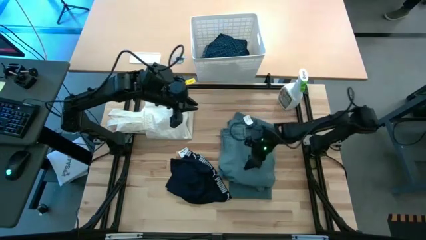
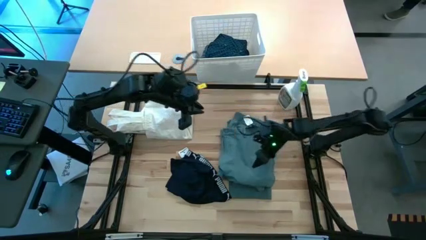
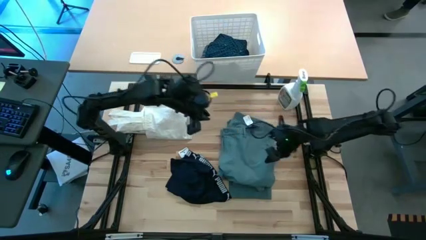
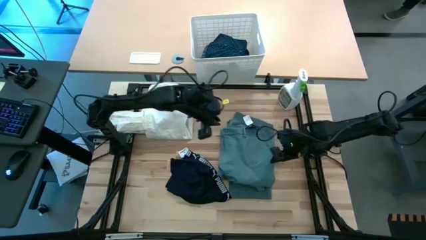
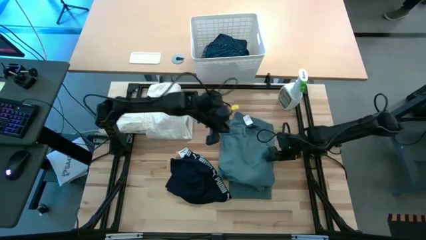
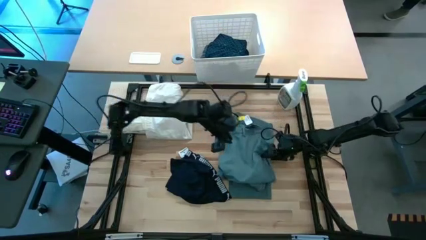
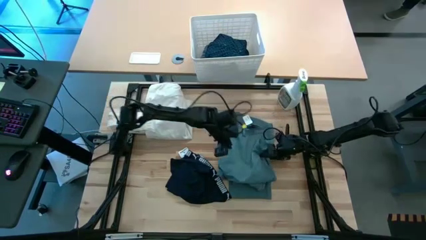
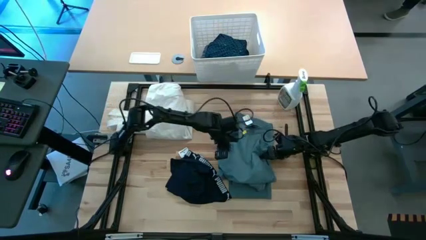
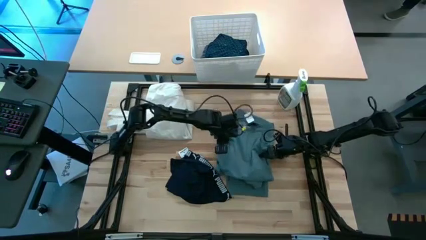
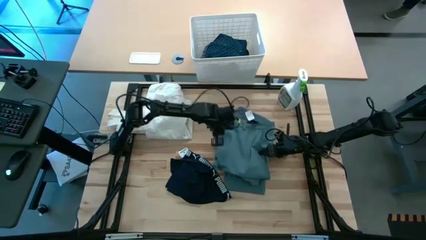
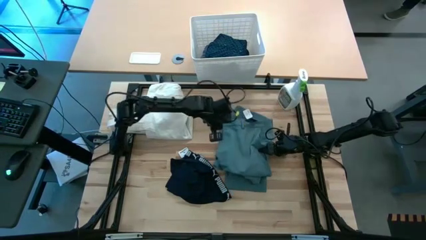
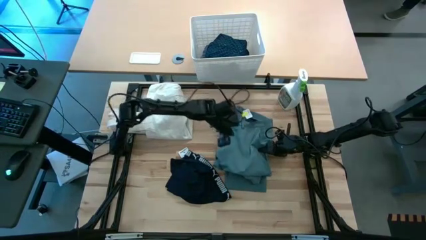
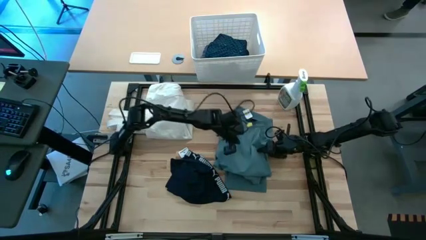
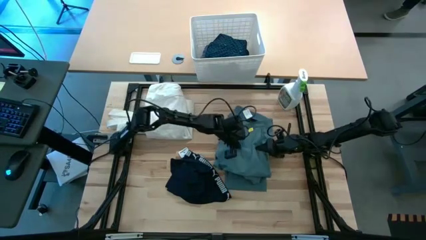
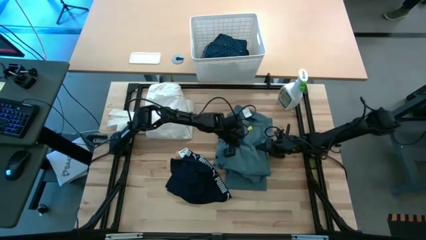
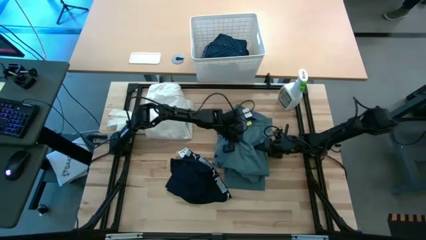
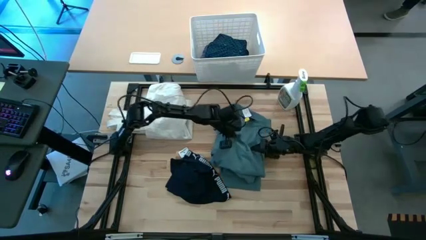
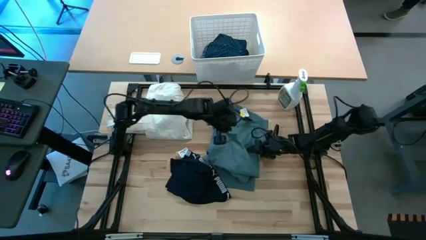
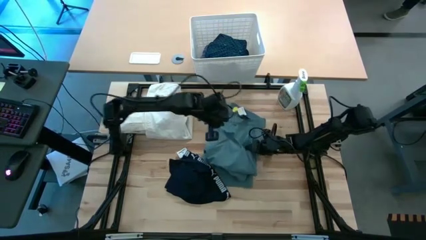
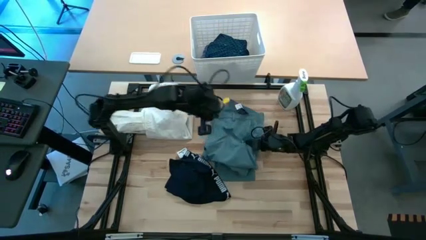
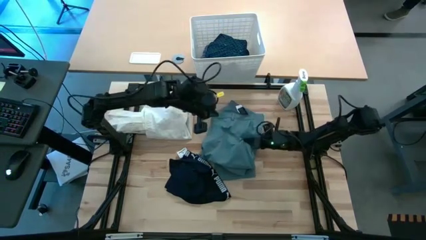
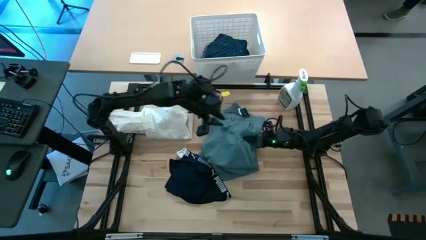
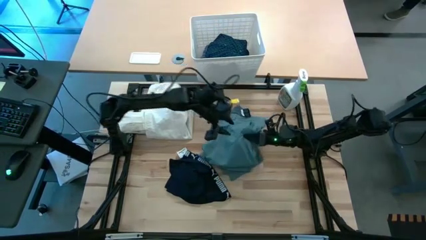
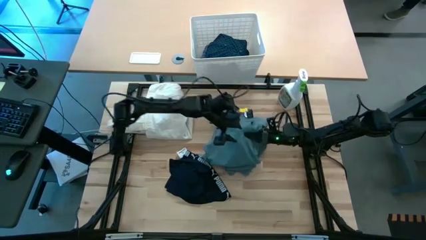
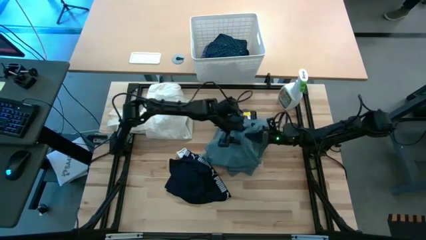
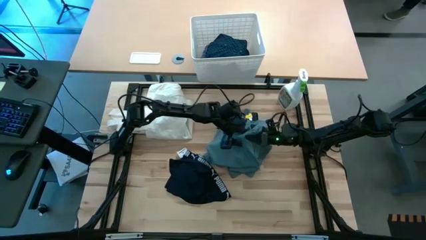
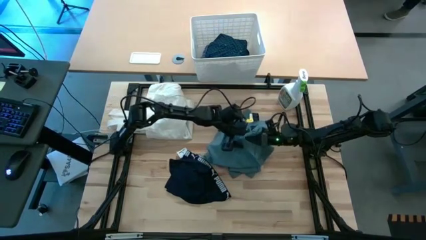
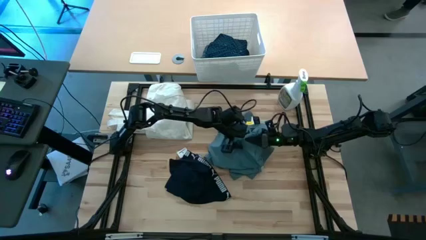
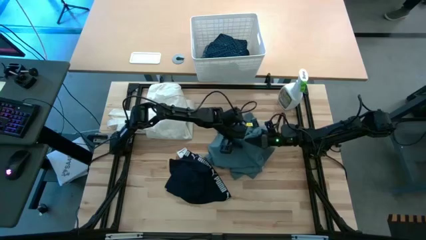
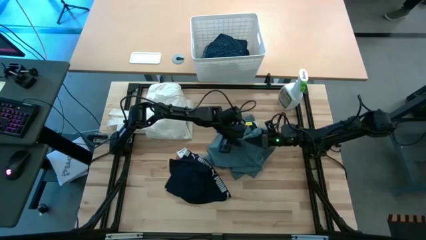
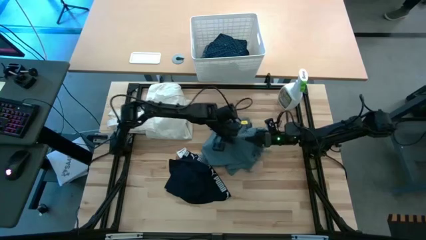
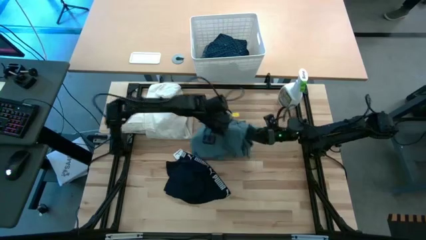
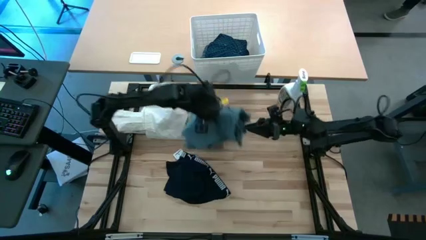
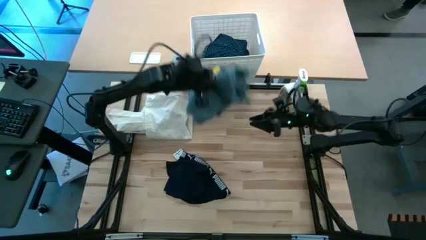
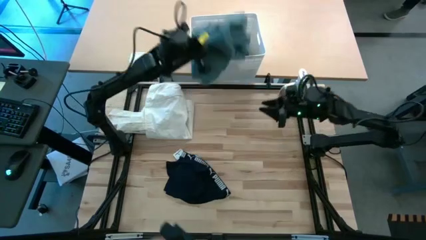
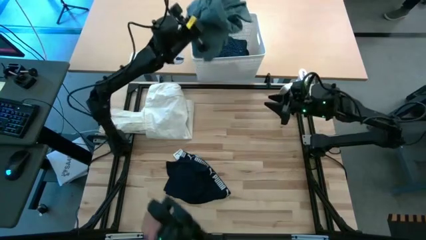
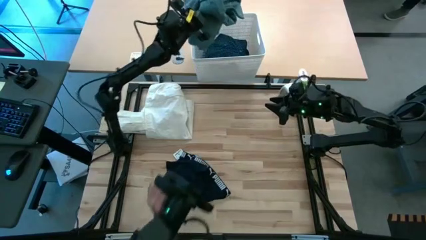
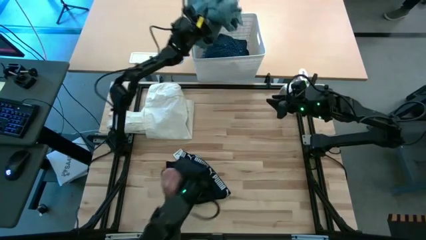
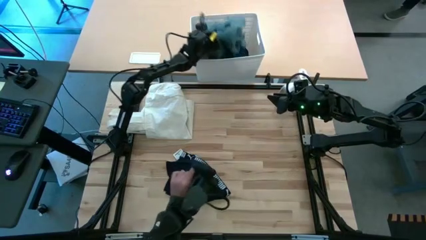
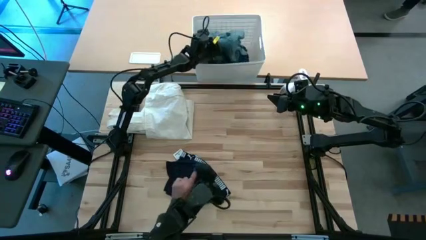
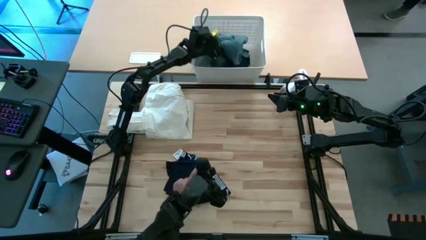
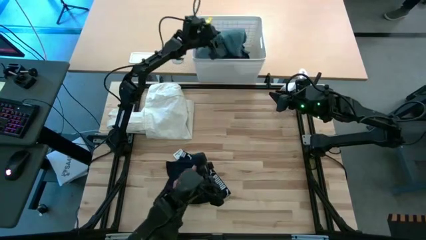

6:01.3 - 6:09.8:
Put the folded green pants into the white bin

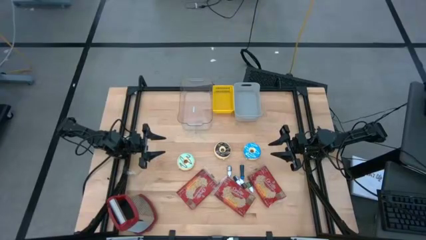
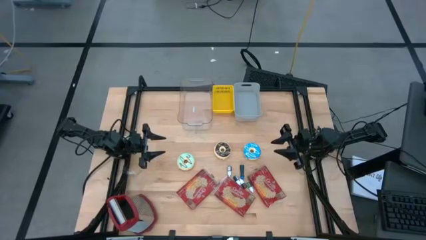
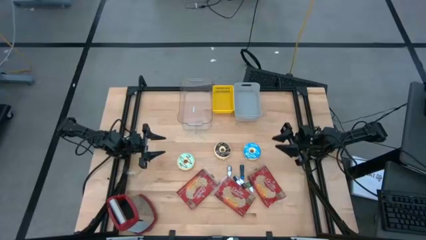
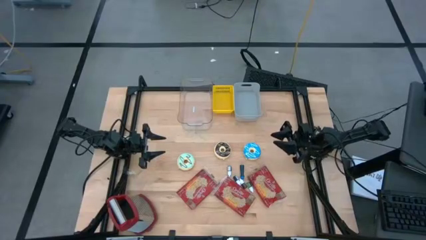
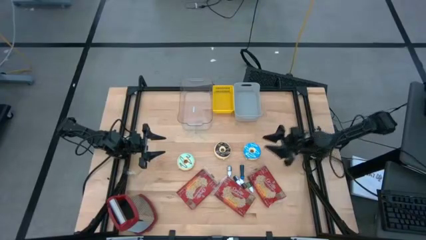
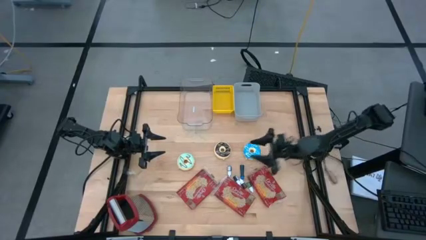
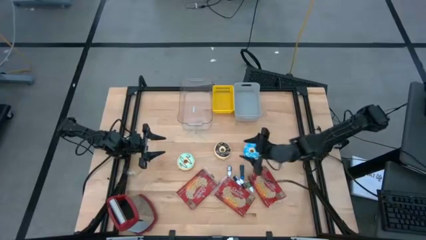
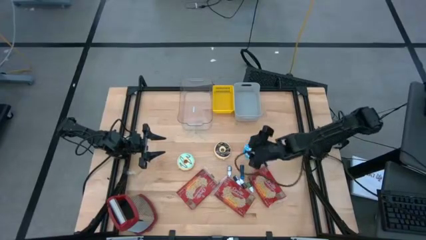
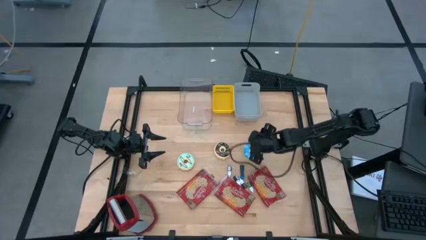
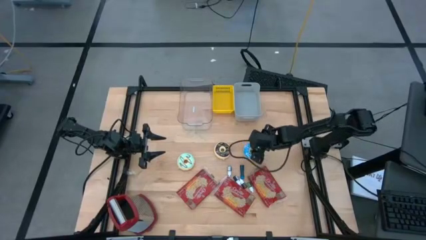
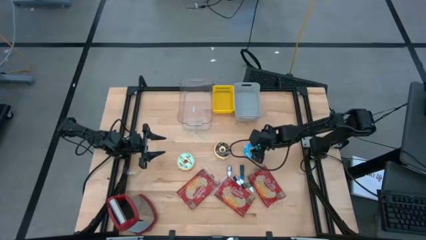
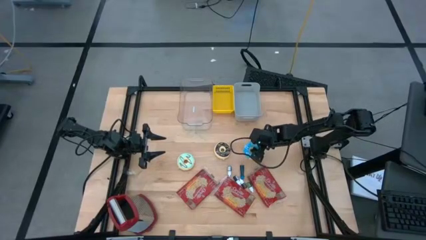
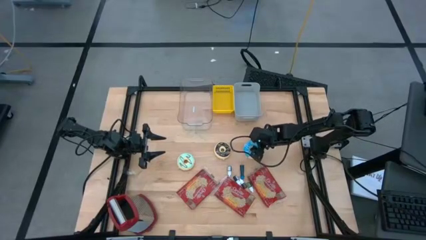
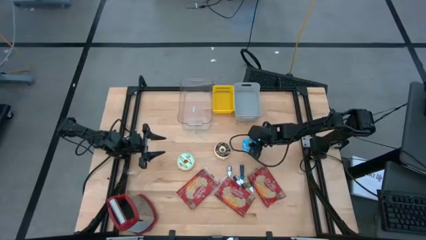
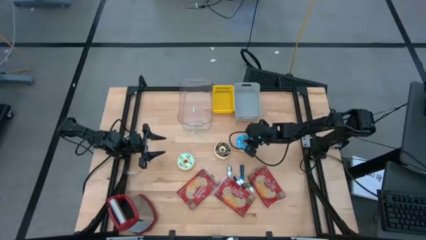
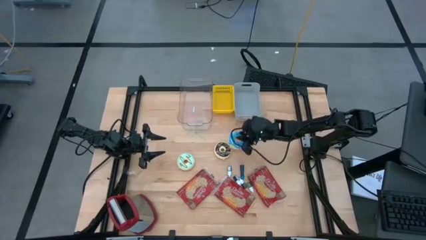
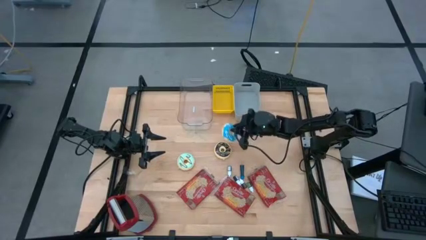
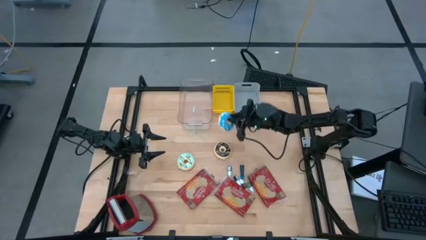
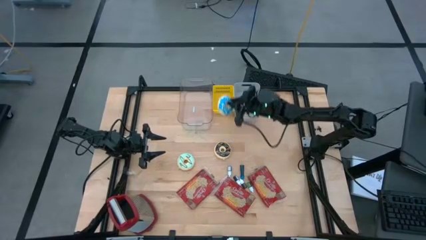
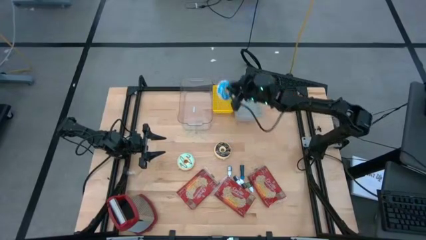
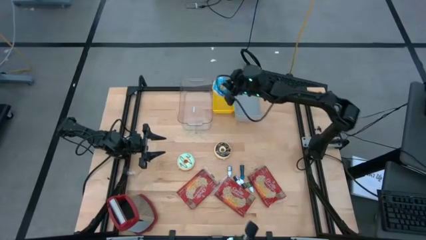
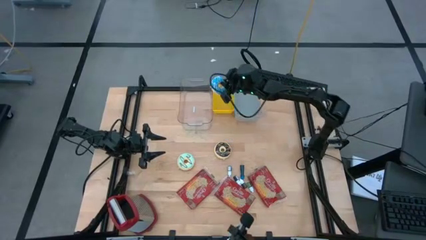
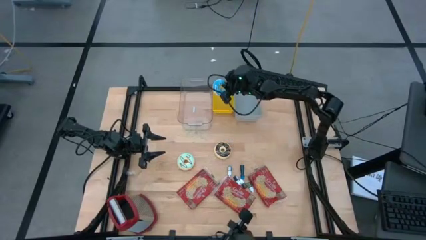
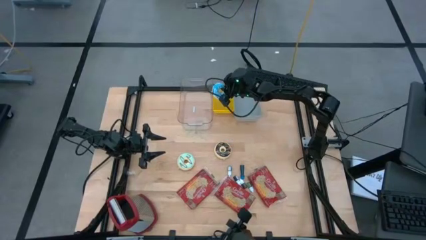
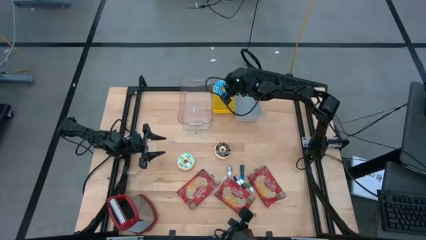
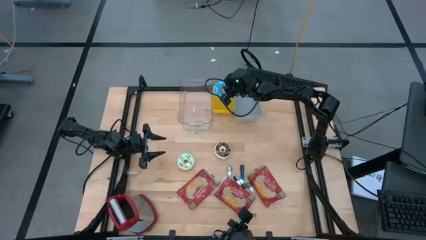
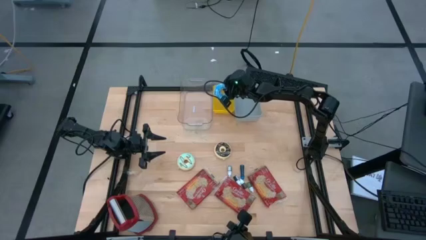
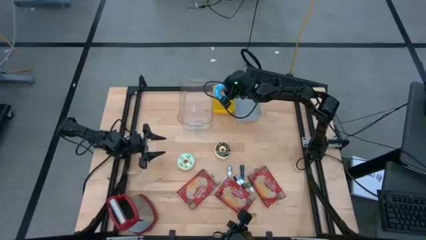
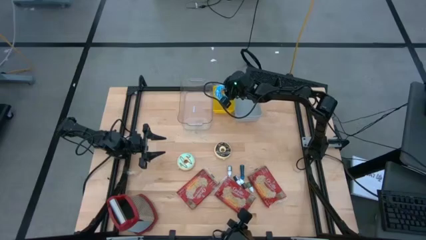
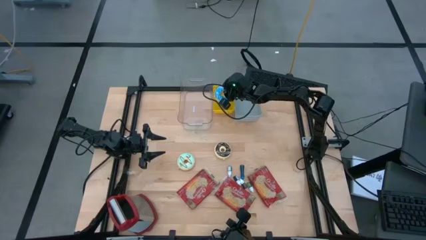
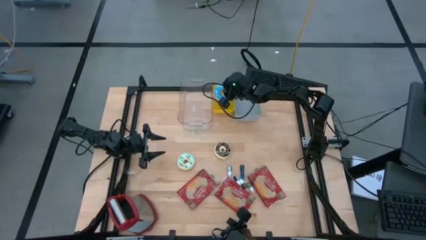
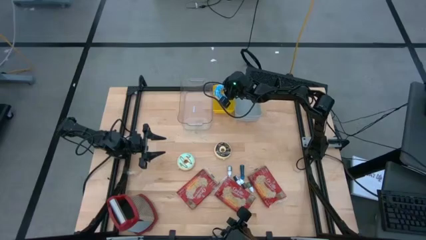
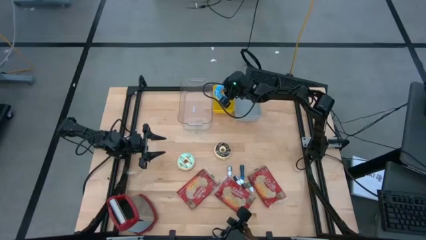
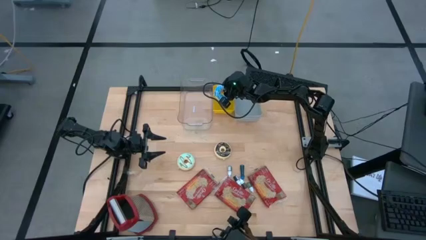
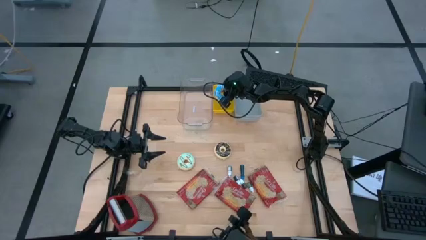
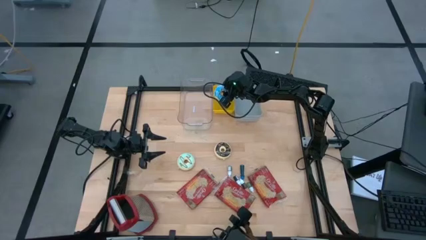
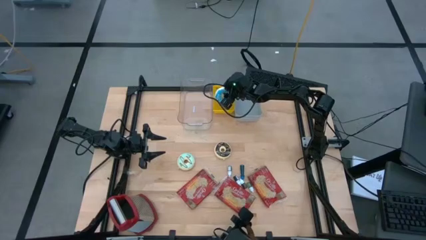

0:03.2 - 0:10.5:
Put the blue donut into the yellow bin
